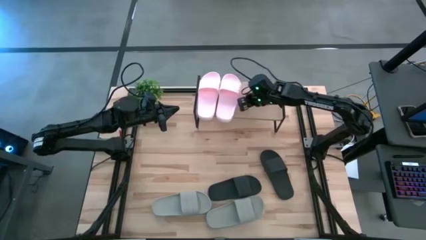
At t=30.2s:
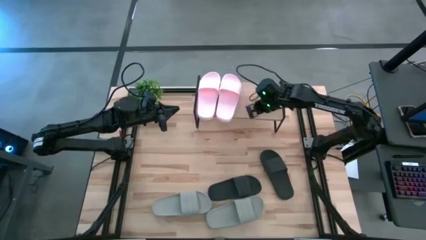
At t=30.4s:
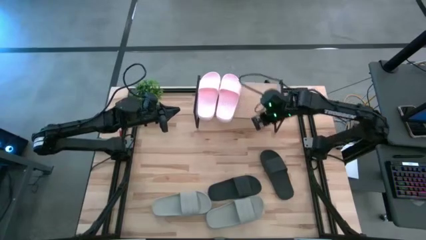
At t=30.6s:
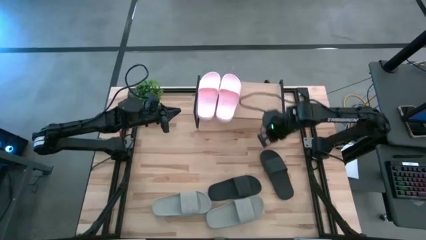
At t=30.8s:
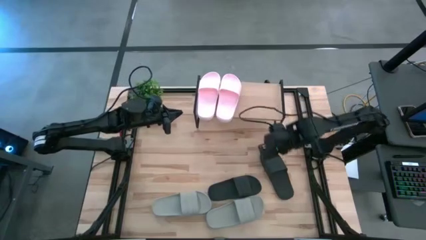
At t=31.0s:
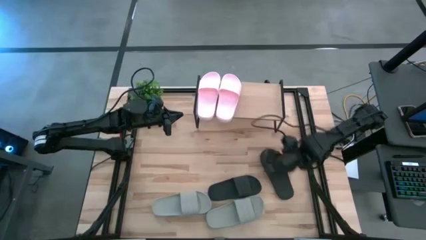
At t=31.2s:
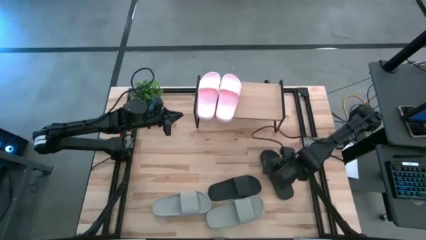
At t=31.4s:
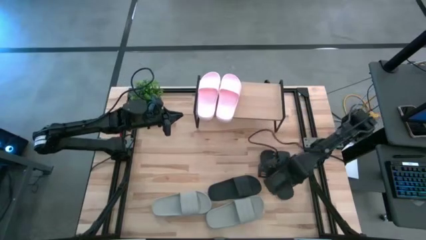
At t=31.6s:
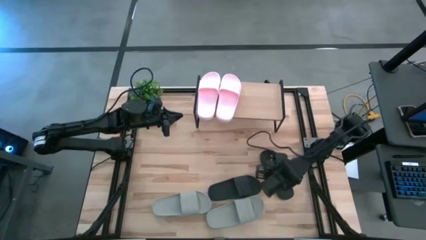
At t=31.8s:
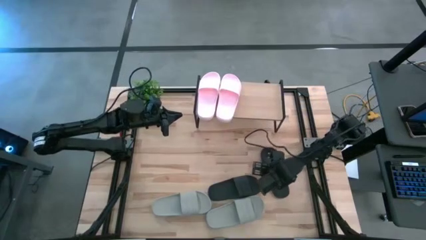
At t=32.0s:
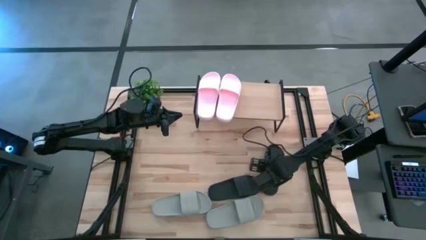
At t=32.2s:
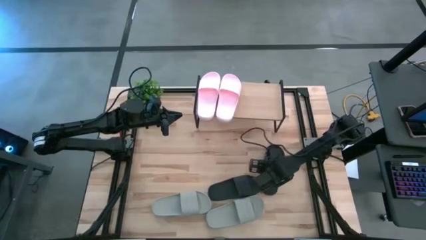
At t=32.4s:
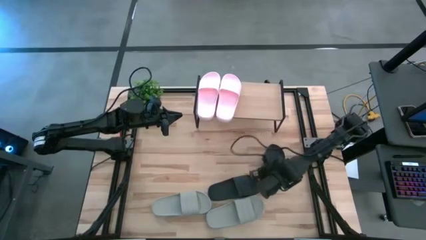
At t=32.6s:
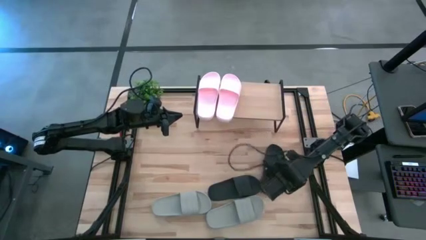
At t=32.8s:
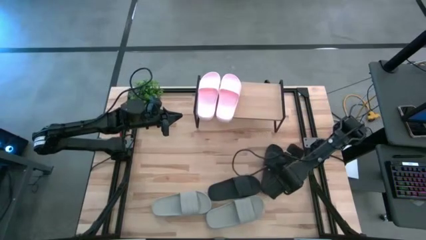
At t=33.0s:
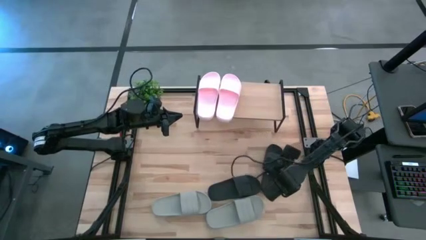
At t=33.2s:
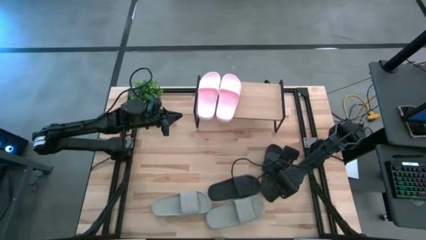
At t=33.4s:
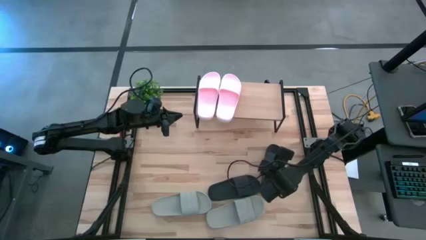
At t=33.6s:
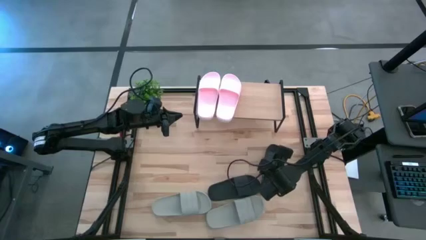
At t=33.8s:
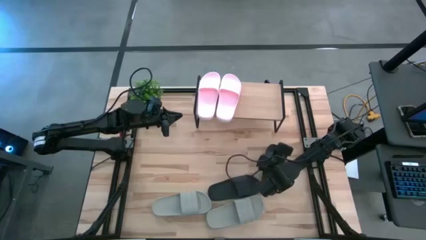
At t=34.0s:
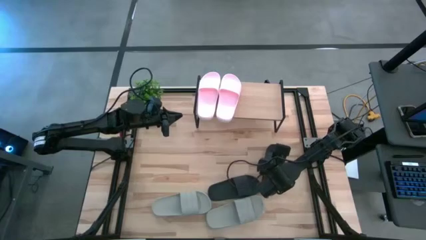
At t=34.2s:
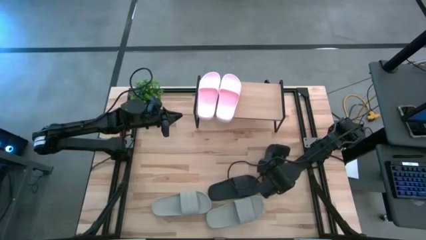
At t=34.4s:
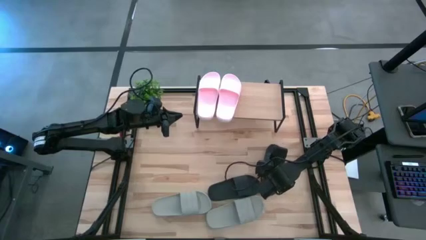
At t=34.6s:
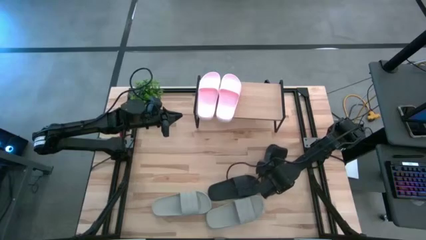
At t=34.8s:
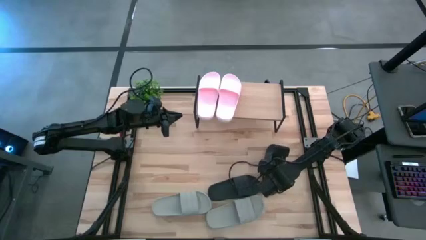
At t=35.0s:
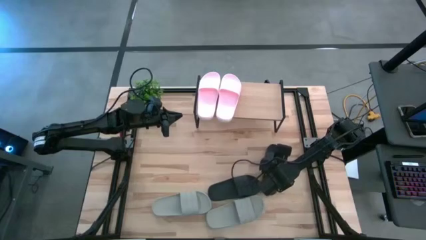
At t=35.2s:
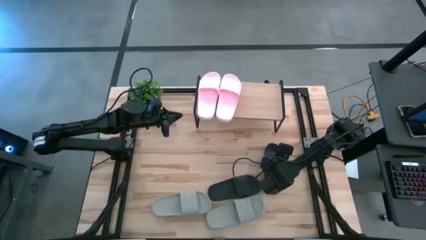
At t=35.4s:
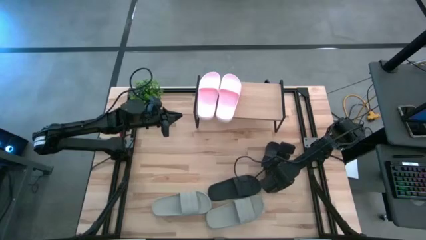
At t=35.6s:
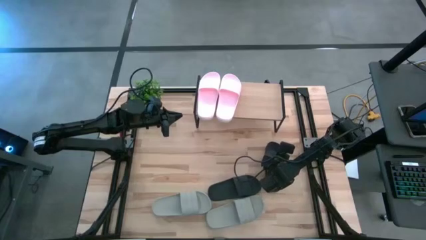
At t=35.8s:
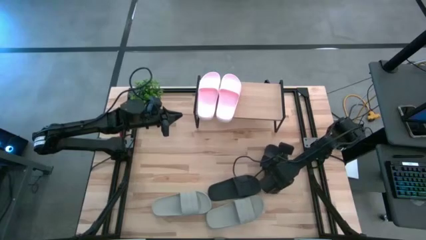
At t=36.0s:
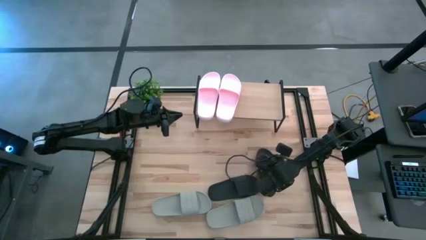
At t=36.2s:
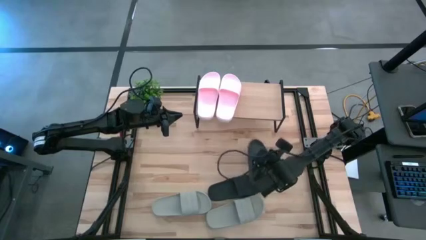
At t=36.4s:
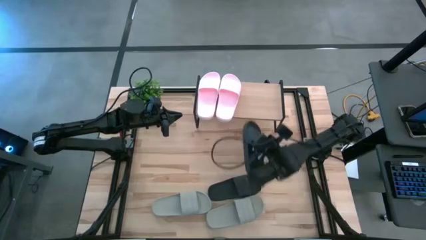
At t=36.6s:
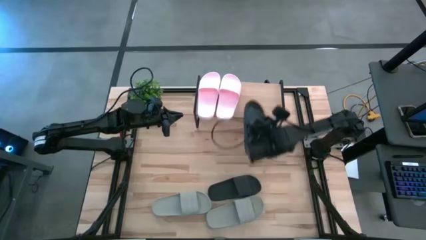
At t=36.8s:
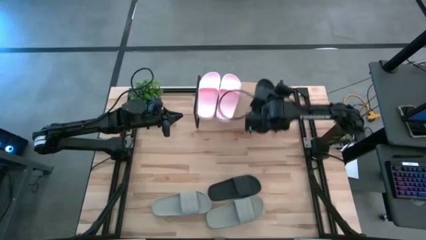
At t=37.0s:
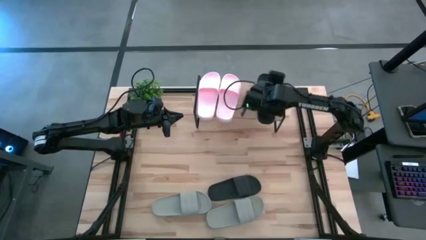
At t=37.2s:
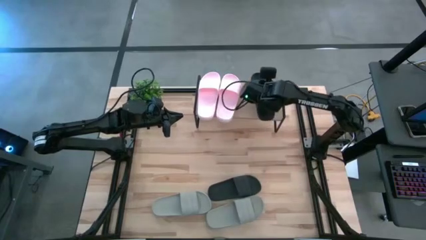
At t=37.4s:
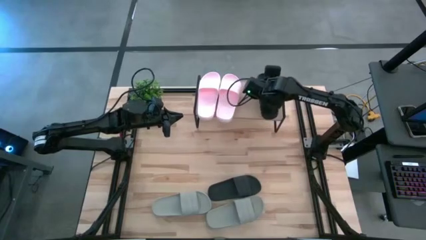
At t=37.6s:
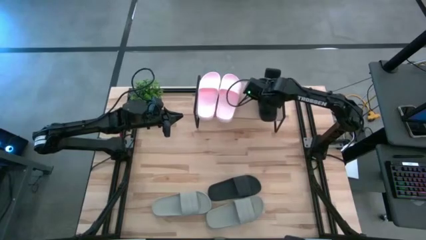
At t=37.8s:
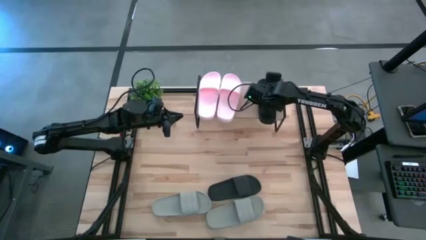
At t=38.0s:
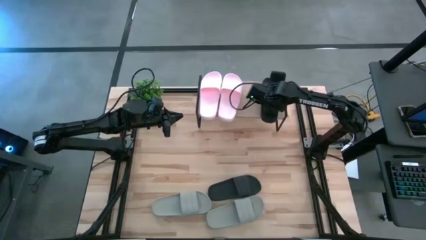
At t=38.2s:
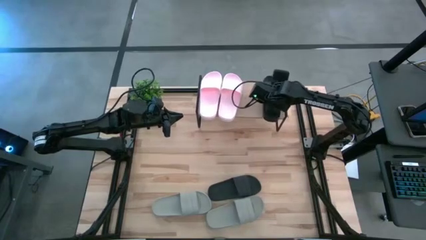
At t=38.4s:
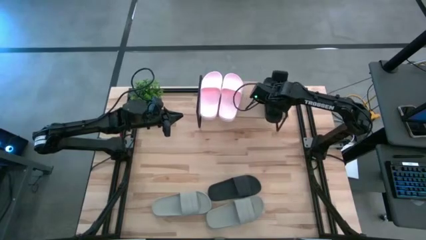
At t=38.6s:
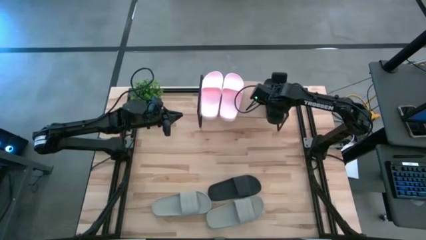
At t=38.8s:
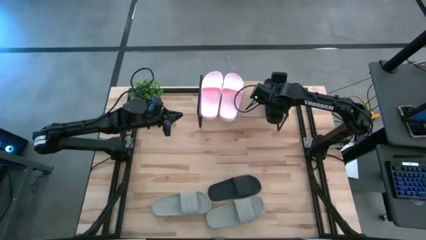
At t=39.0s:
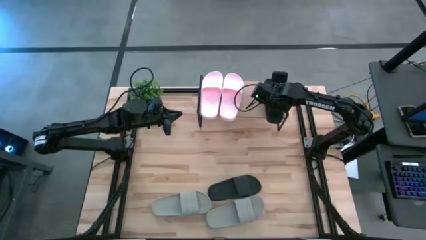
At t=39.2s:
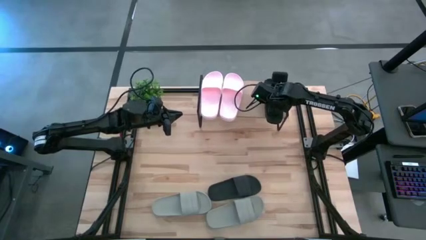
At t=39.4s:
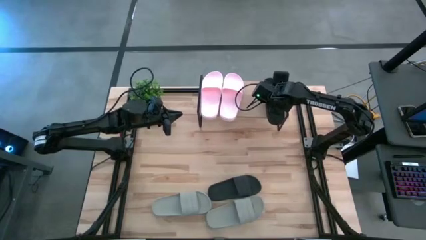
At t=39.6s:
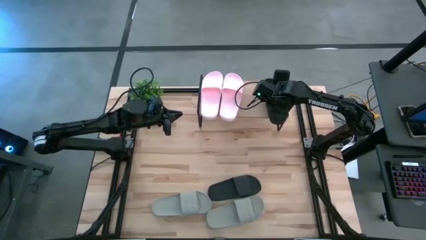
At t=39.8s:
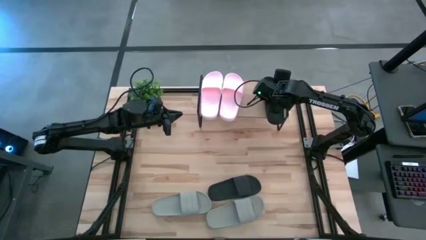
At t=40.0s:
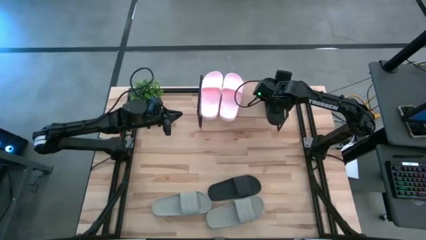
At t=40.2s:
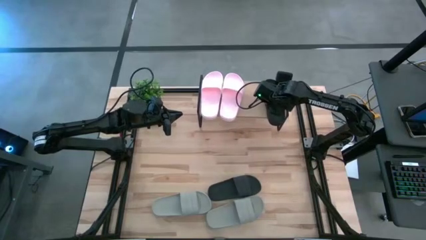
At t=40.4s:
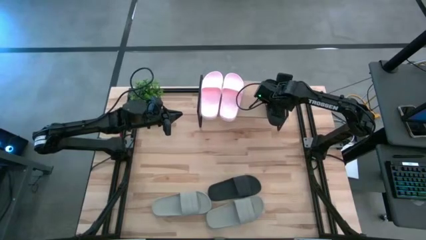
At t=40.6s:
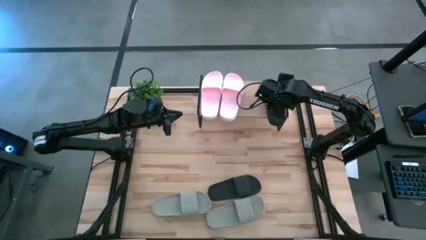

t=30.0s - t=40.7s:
Task: Pick and place slides into the shelf
Put the right black slide on the shelf

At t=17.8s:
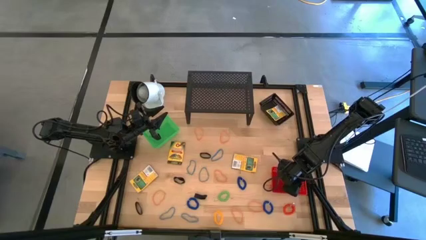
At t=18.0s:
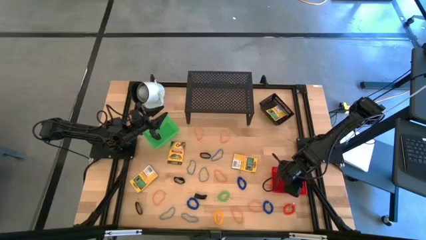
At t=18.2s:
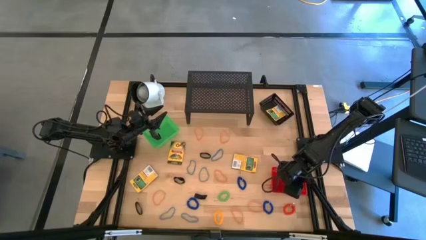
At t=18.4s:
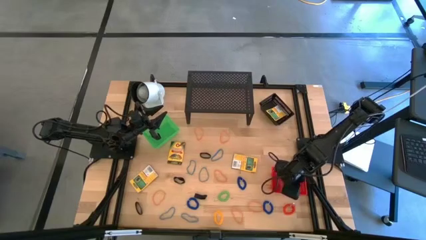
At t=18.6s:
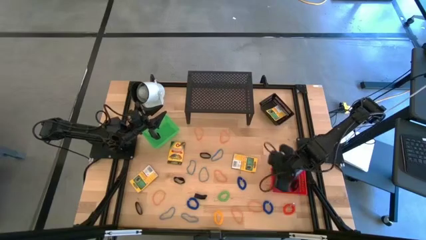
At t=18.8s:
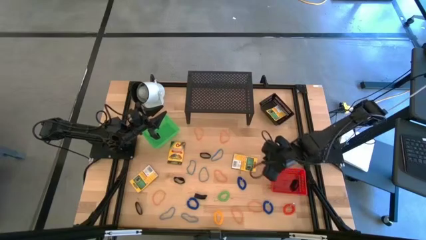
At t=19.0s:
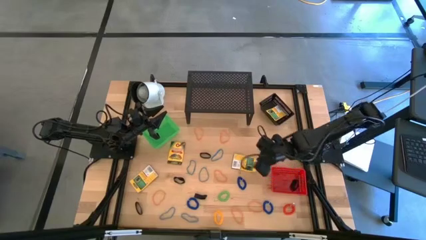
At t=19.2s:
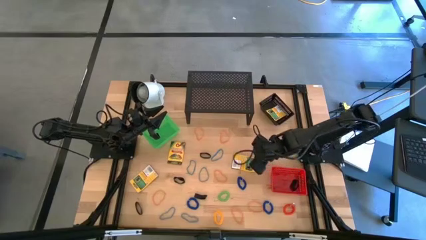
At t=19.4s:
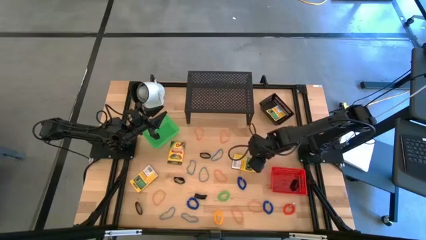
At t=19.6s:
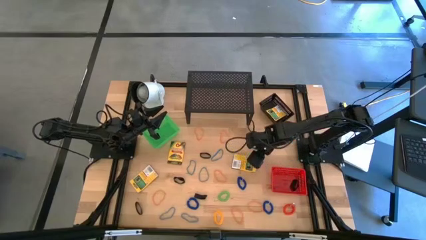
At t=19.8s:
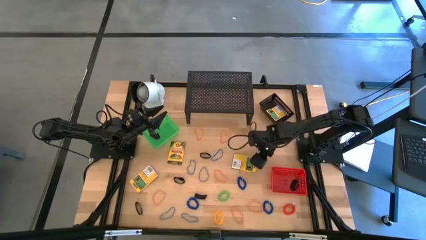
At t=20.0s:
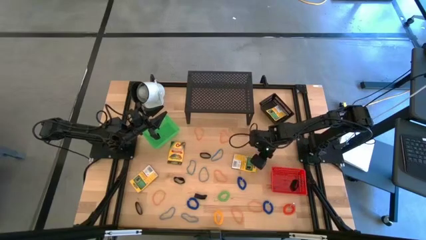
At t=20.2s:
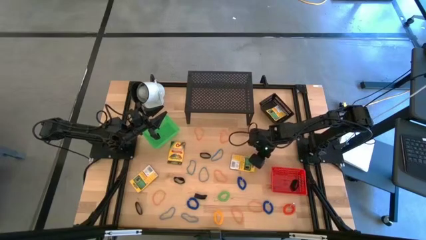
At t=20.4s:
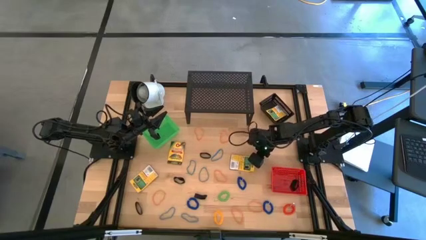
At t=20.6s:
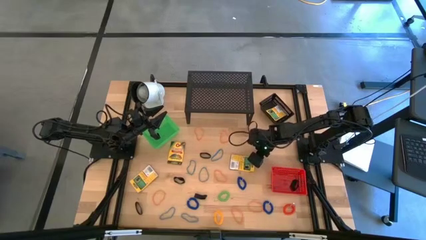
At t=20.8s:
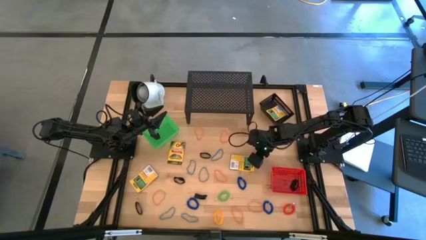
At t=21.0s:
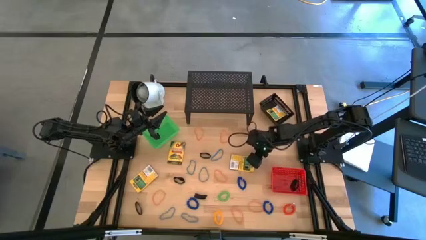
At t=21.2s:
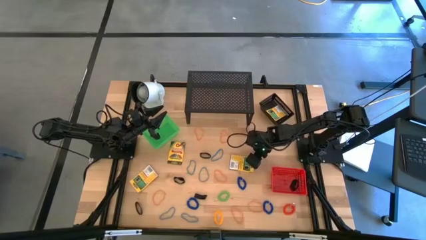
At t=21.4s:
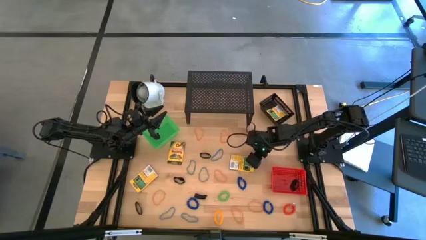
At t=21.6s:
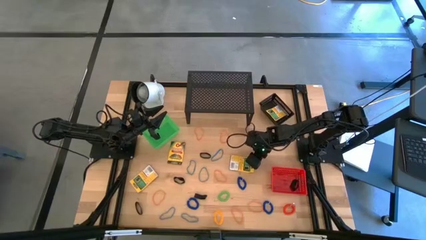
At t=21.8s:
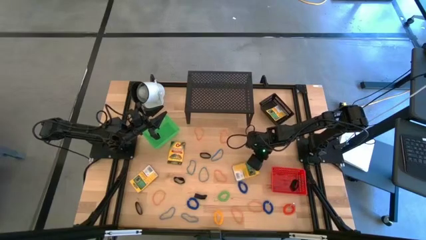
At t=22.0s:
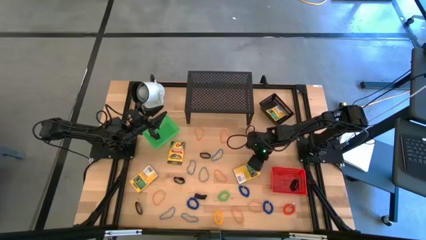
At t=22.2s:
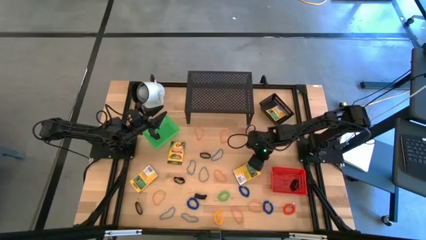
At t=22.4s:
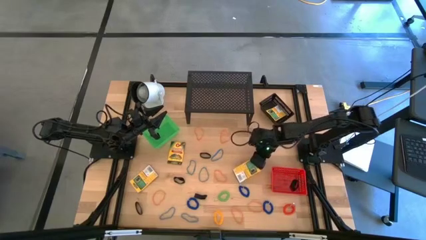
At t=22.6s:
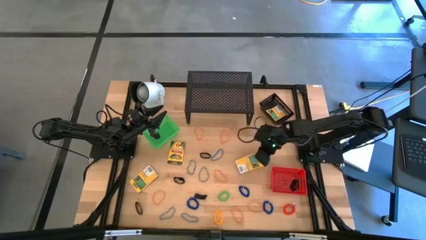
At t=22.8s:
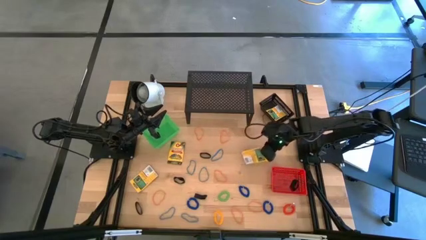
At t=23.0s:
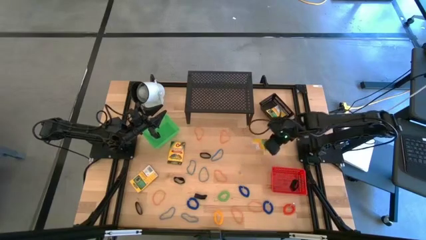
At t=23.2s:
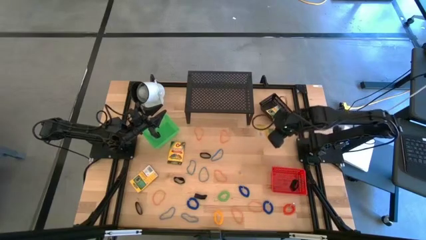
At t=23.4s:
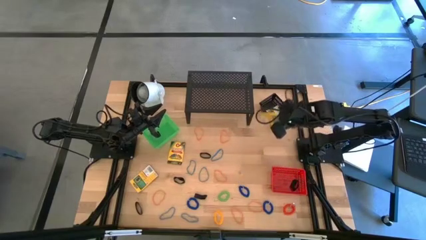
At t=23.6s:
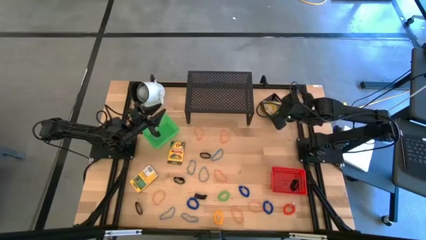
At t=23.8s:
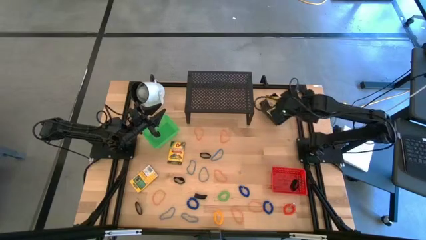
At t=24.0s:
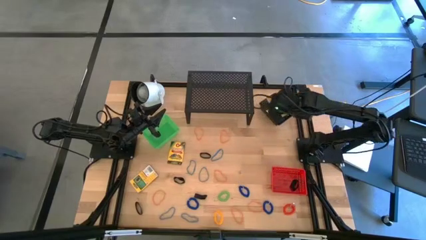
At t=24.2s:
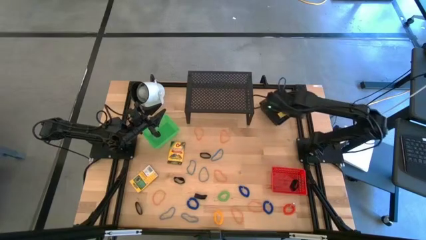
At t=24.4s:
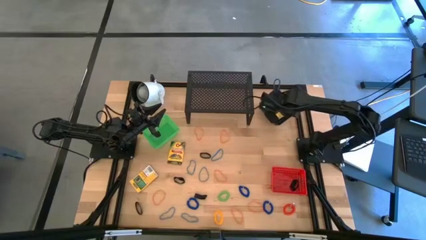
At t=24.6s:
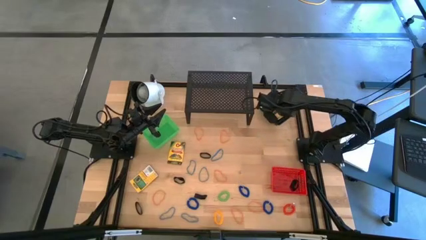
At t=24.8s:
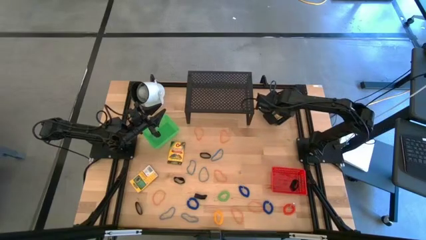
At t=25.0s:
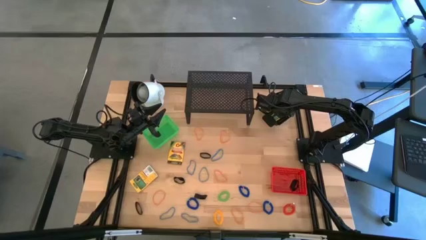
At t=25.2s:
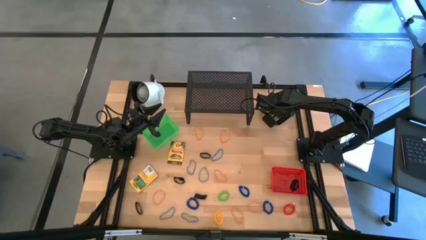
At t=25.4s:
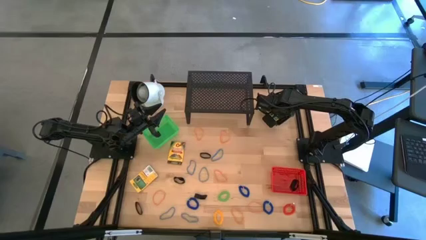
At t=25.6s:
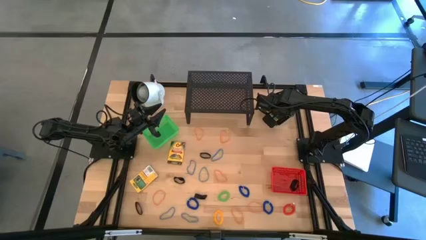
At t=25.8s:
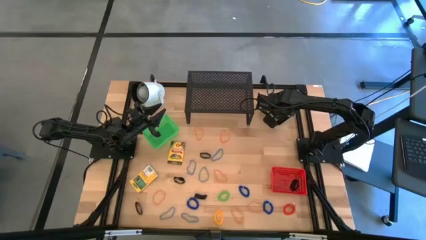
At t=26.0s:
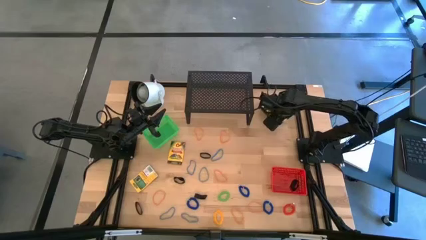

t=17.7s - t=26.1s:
Task: Pick & Place Office Desk Supplies
Put the top right crayon box into the black bin
